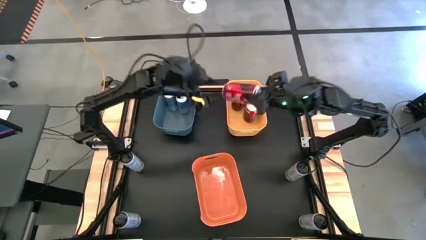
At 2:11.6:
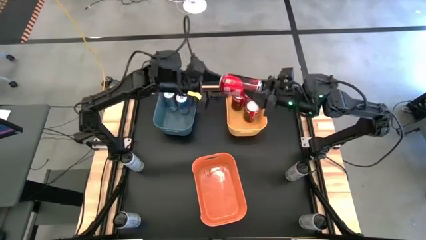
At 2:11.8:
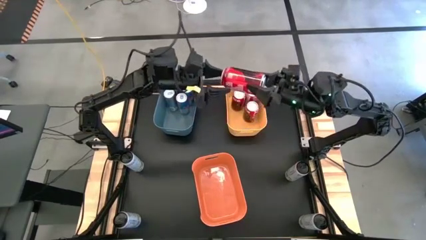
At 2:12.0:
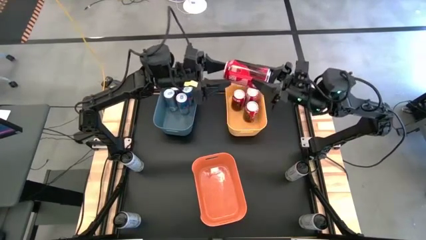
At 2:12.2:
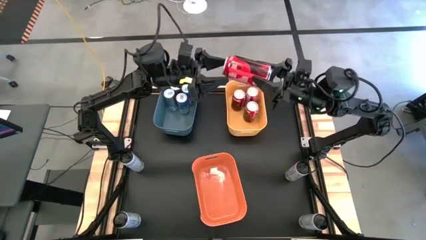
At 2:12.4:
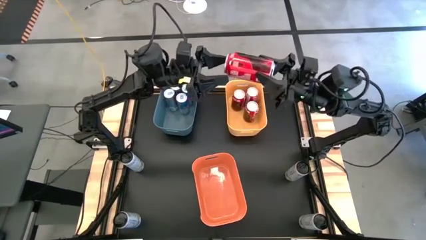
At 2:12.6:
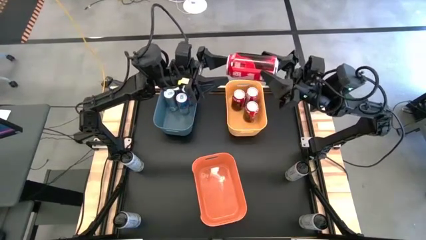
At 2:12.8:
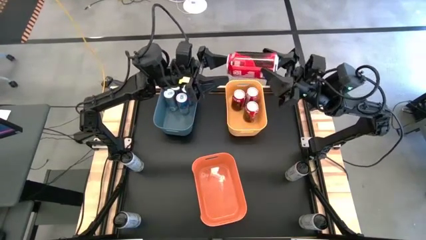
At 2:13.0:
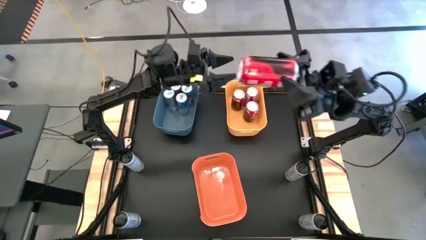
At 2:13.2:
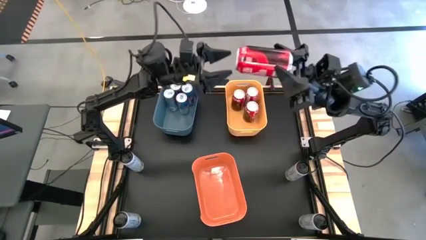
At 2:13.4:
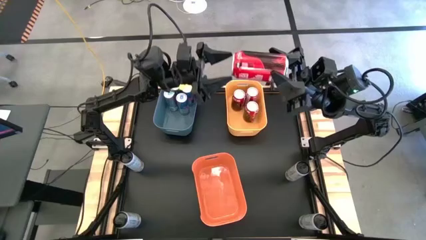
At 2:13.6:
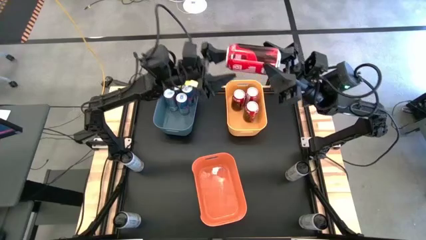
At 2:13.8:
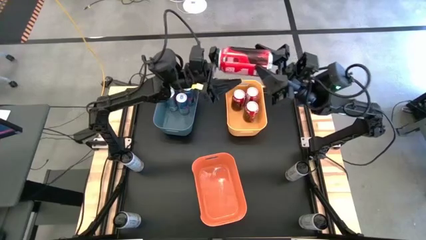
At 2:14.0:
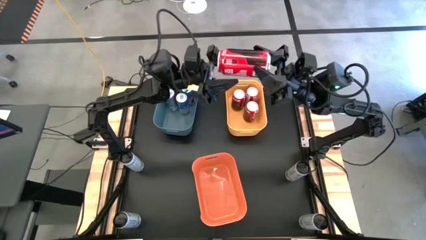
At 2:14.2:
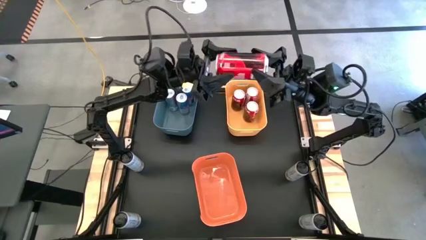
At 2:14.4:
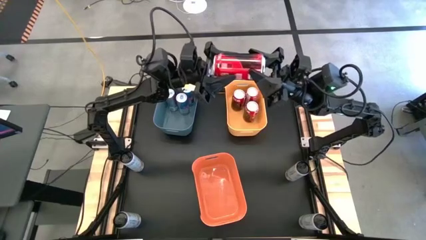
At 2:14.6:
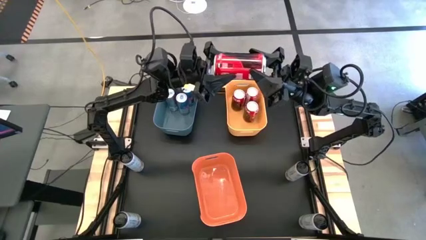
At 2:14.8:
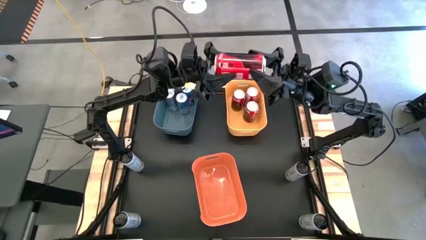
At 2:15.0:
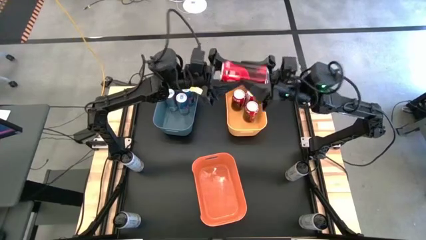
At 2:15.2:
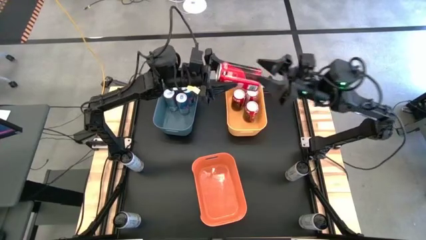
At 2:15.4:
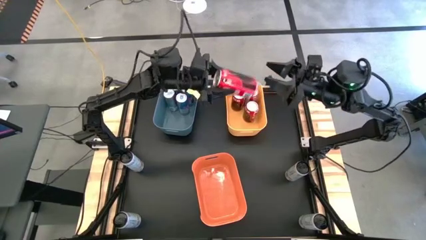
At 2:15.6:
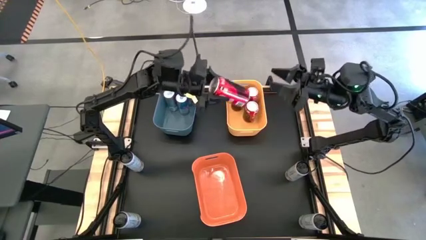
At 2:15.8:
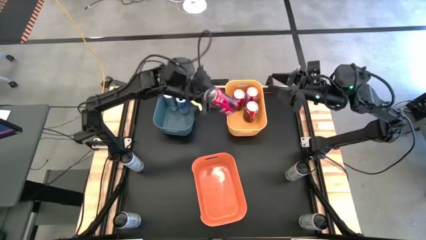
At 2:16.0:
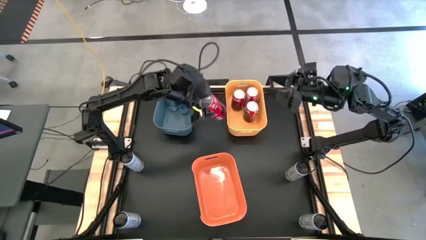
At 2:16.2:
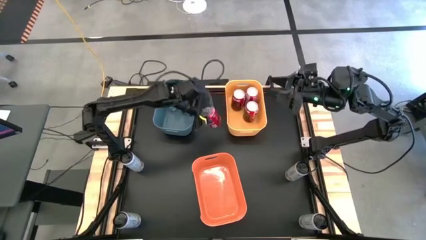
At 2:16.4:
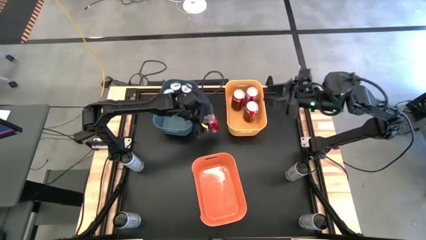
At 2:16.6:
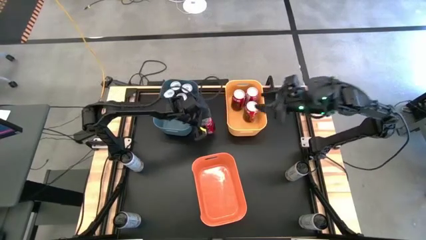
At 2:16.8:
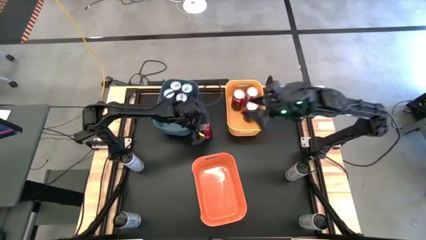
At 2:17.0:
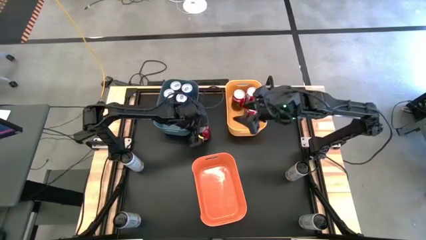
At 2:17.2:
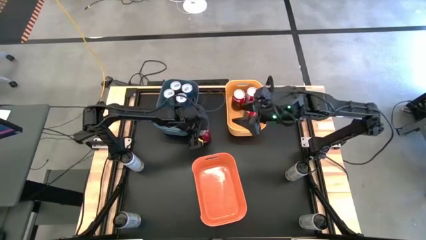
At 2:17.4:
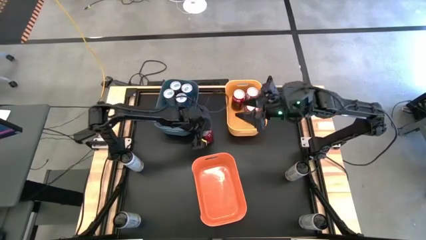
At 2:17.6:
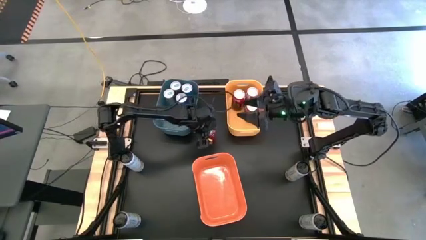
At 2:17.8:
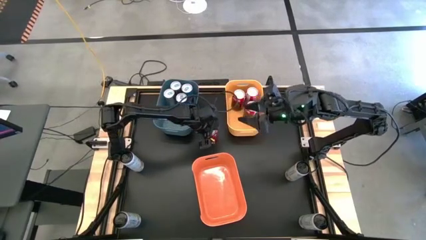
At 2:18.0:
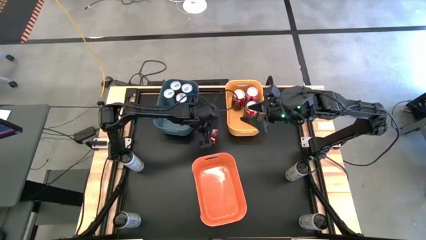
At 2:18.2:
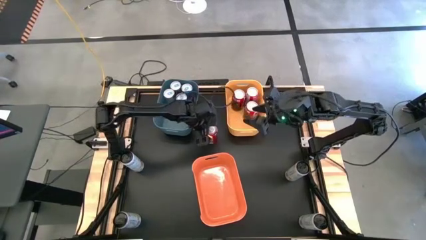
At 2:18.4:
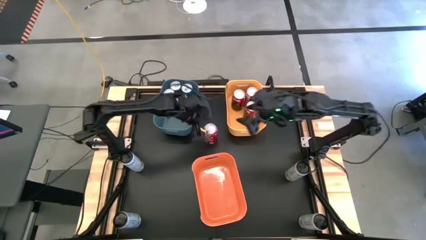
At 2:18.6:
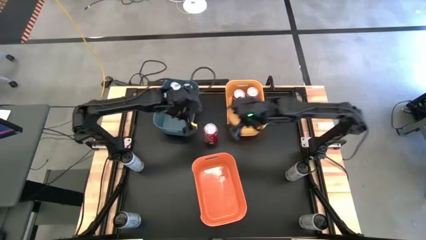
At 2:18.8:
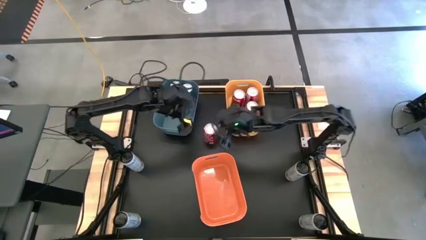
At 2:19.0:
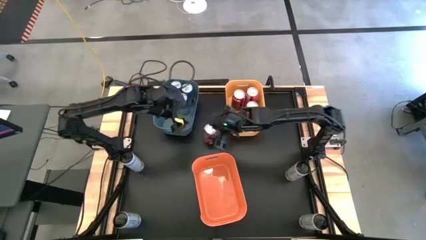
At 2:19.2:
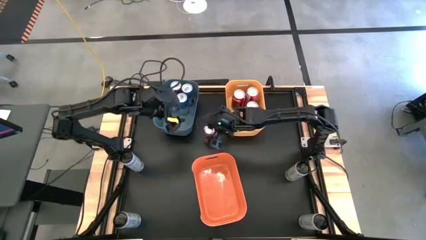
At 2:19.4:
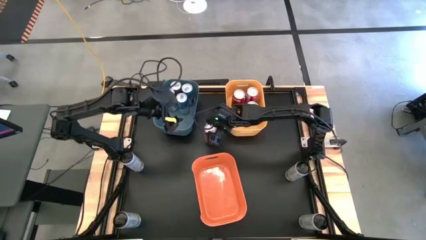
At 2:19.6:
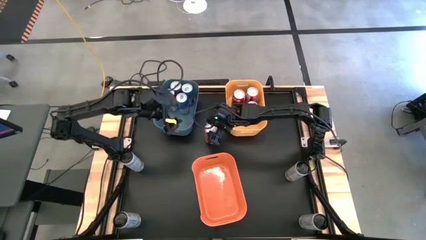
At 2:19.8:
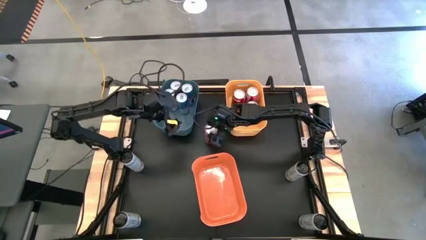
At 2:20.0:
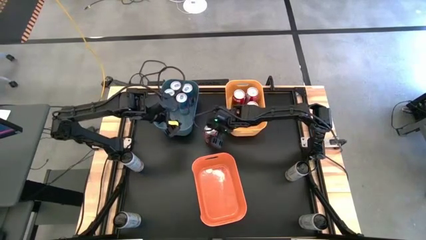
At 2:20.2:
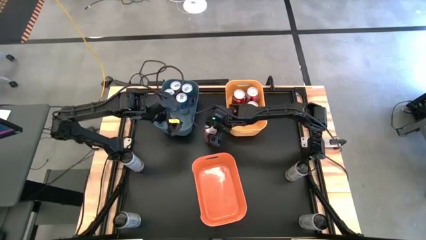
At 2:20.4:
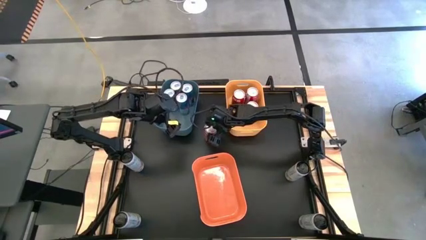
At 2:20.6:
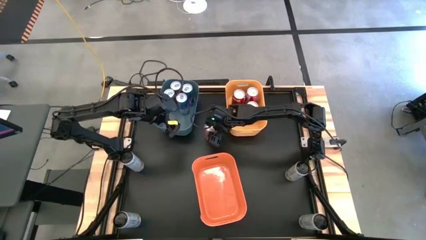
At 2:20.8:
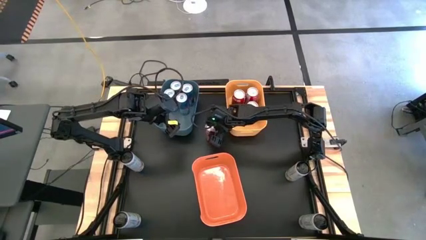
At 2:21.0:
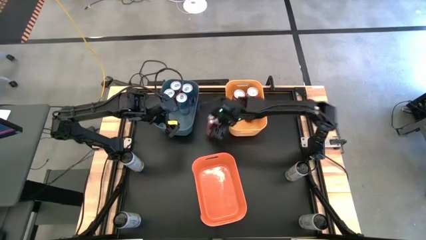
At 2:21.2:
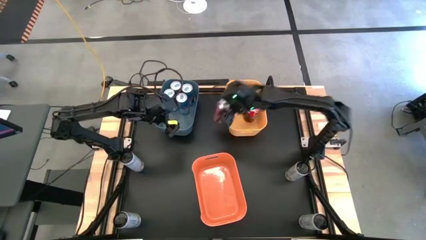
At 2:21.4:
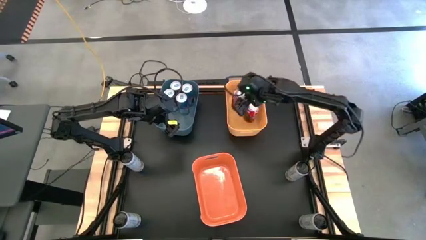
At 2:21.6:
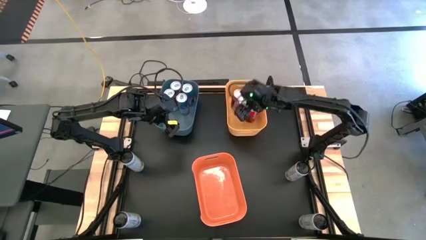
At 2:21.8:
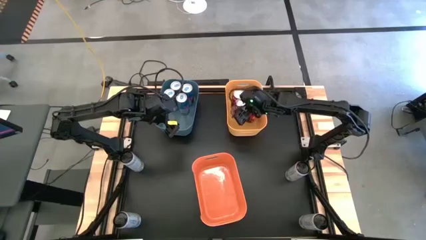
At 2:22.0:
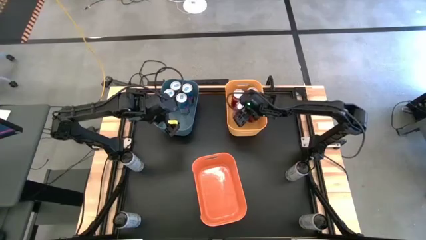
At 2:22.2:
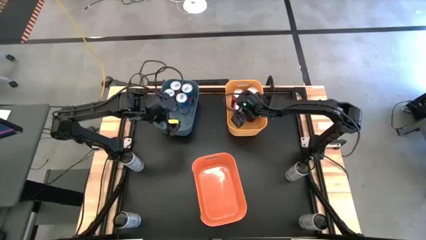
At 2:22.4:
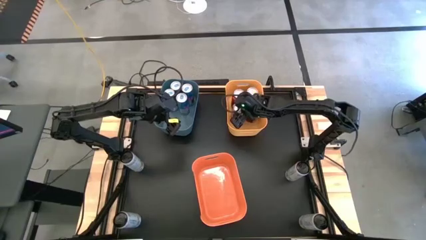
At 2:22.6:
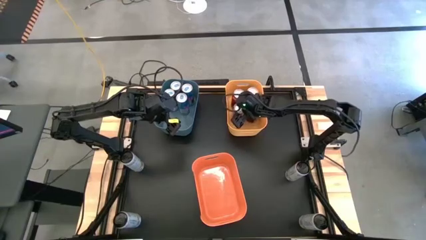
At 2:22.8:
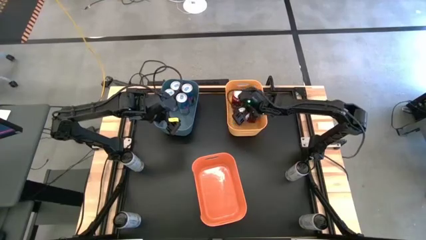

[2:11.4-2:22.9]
Task: Sort soda cans
Put the red soda can into the yellow bin

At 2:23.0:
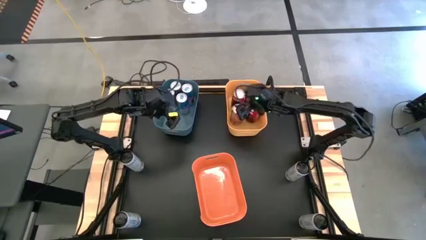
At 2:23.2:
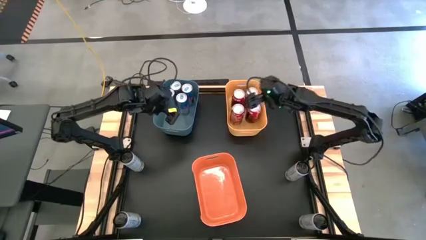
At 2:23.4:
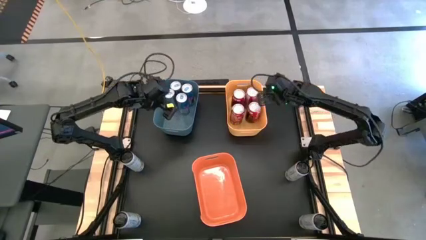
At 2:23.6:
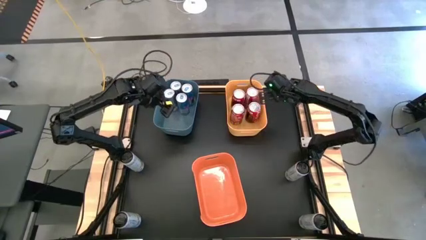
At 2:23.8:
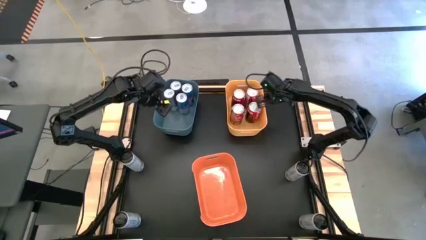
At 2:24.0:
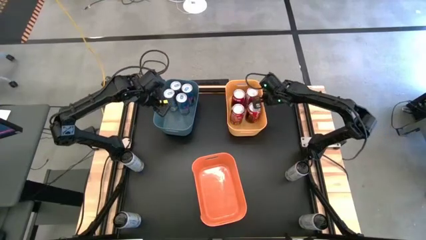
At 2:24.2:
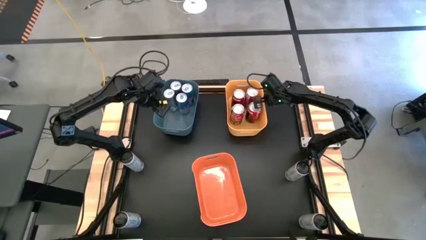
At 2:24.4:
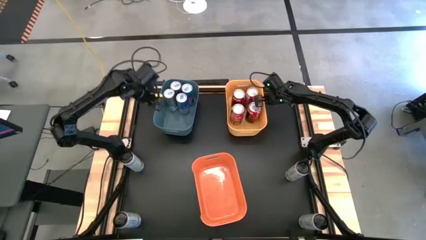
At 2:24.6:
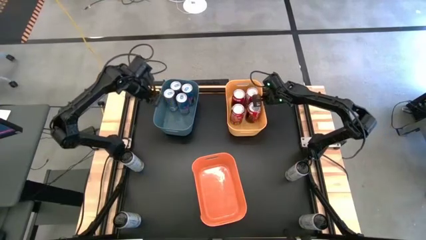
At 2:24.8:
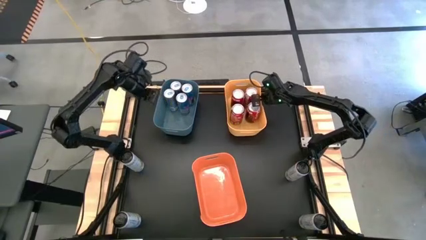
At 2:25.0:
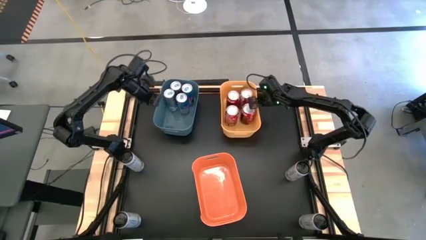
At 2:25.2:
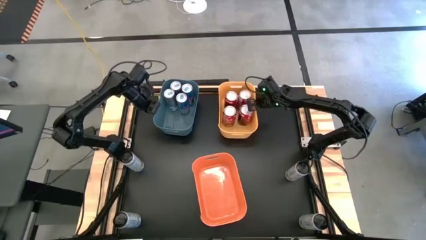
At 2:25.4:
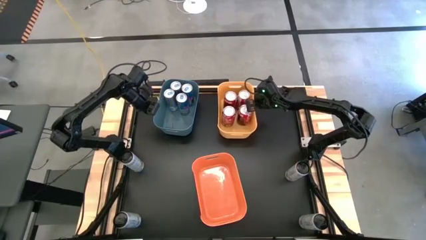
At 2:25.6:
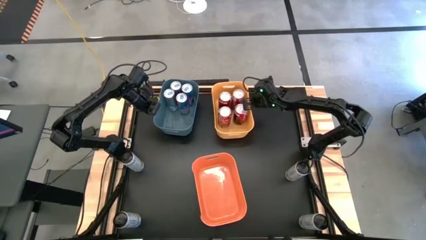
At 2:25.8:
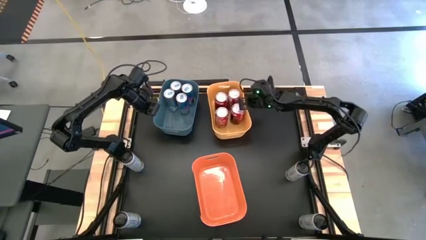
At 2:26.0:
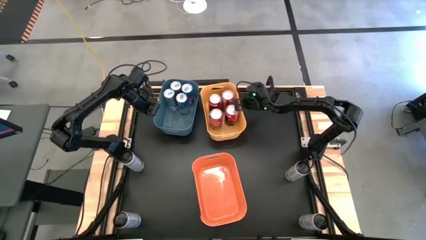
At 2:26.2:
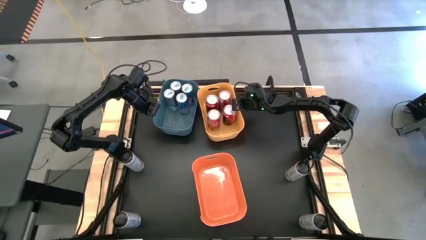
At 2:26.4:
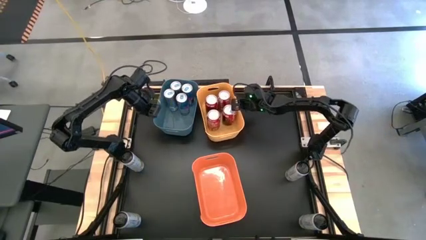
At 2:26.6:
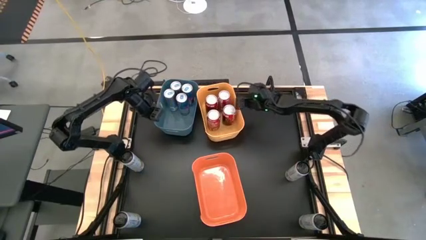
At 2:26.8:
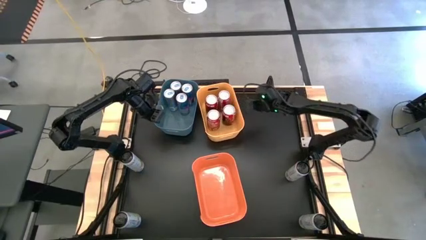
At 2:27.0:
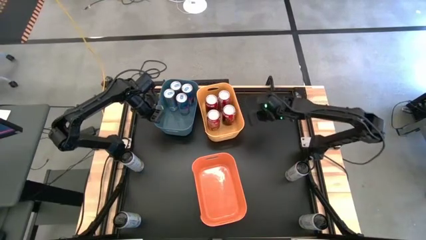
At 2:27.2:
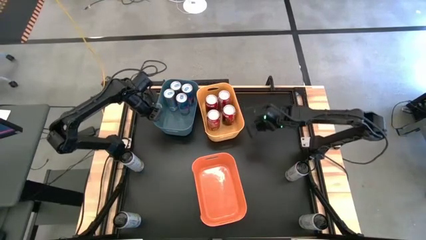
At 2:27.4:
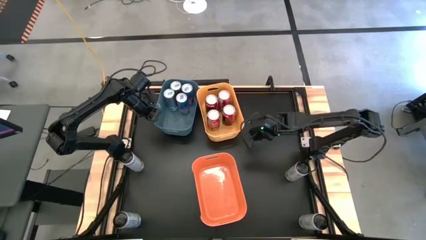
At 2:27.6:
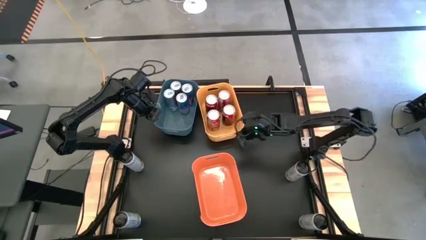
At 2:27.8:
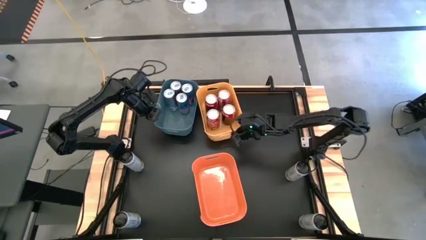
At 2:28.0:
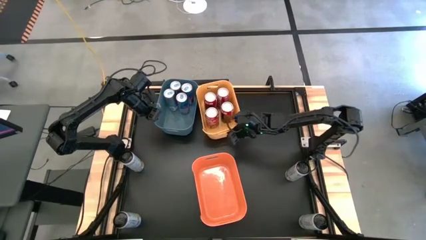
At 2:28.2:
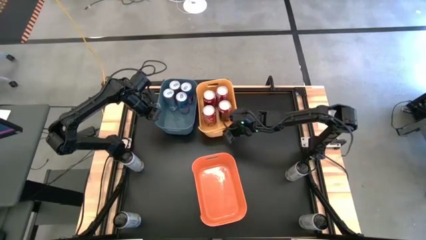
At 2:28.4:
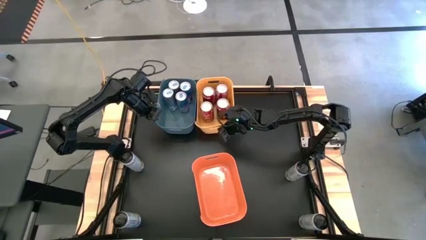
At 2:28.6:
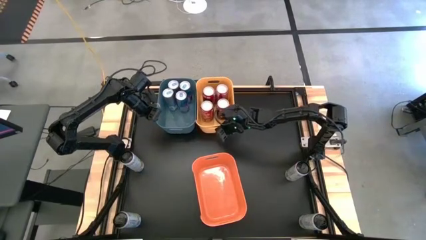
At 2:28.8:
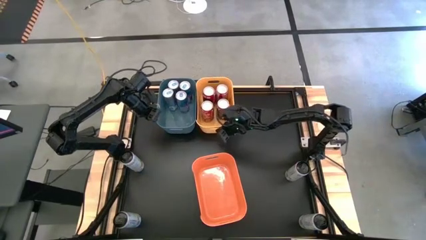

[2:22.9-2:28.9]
Adjust the yellow bin
